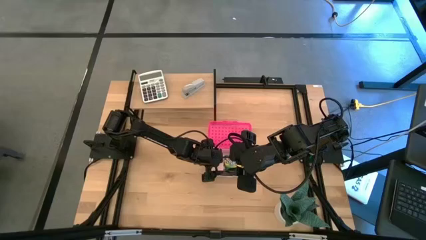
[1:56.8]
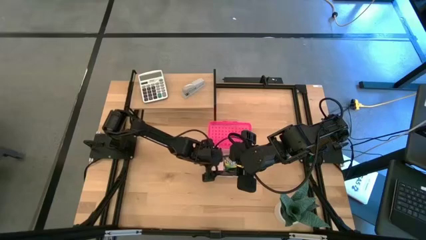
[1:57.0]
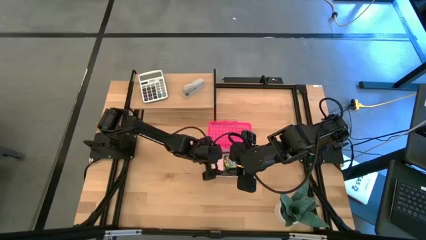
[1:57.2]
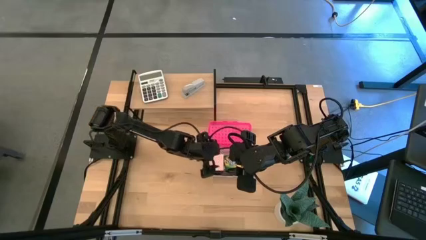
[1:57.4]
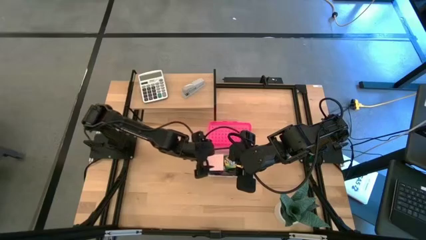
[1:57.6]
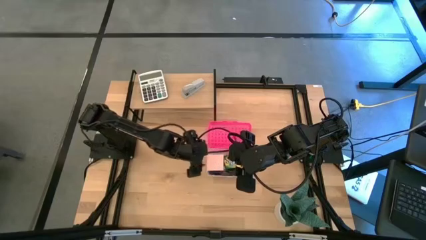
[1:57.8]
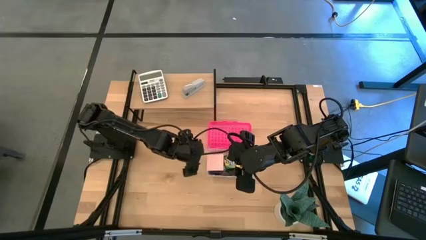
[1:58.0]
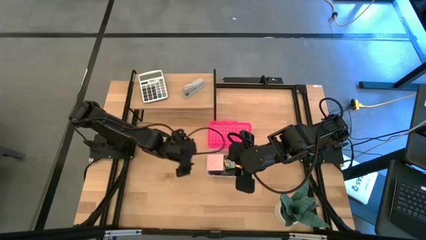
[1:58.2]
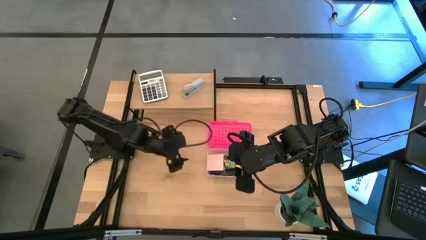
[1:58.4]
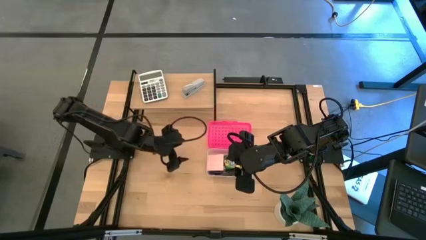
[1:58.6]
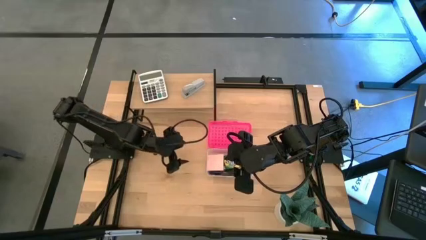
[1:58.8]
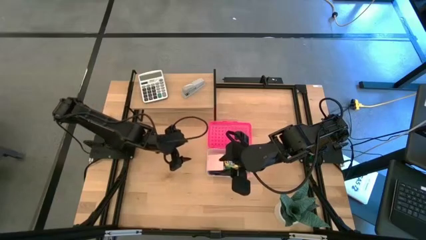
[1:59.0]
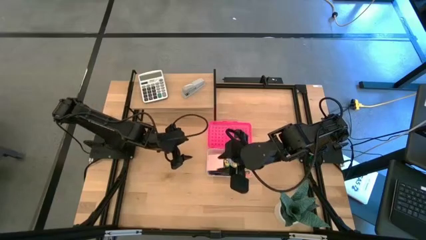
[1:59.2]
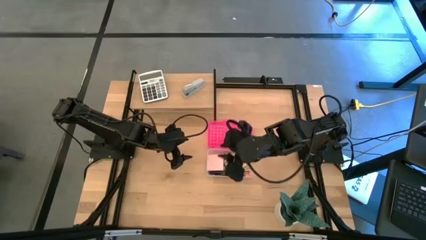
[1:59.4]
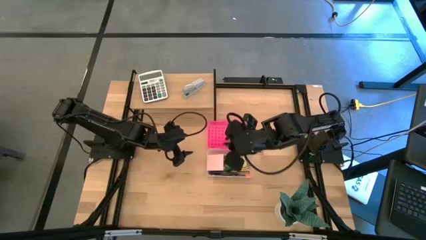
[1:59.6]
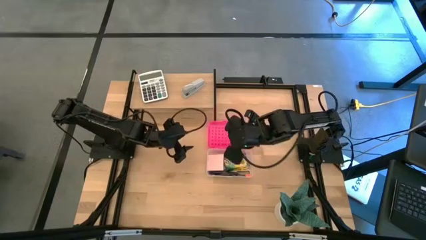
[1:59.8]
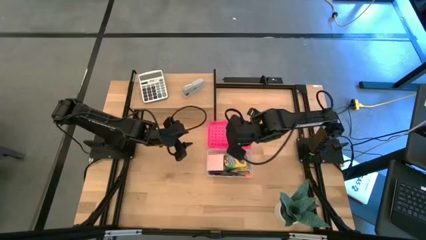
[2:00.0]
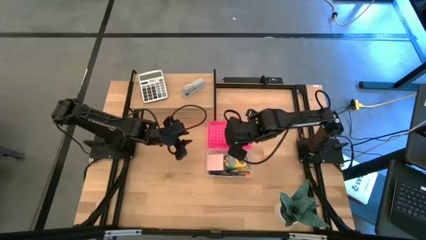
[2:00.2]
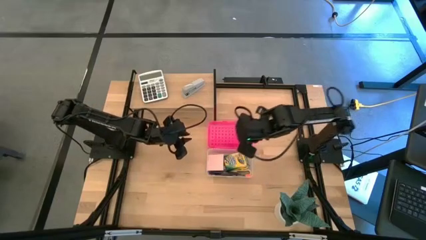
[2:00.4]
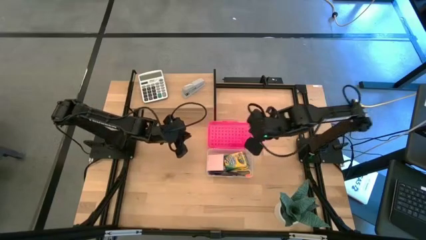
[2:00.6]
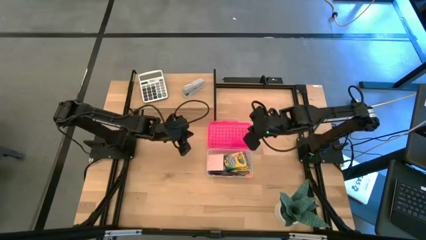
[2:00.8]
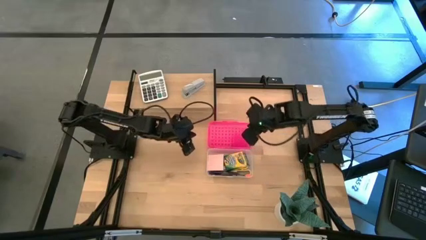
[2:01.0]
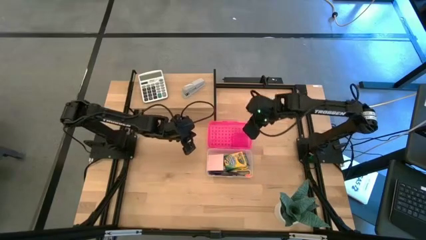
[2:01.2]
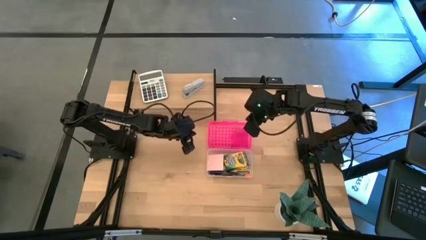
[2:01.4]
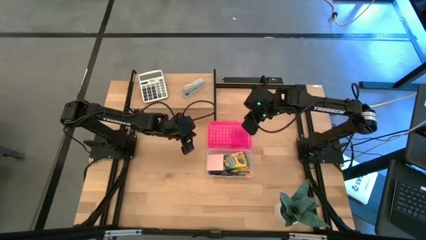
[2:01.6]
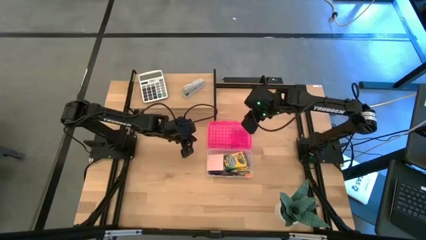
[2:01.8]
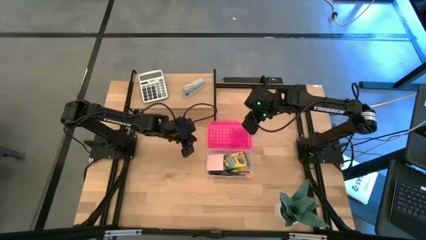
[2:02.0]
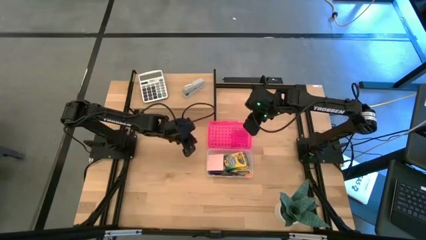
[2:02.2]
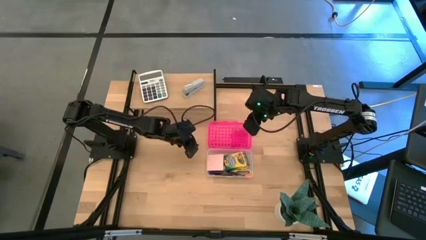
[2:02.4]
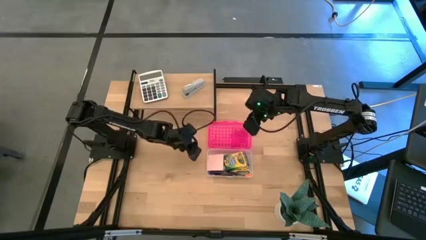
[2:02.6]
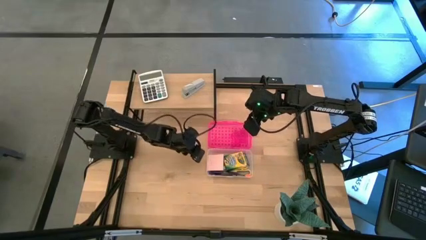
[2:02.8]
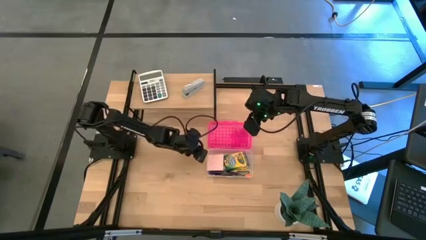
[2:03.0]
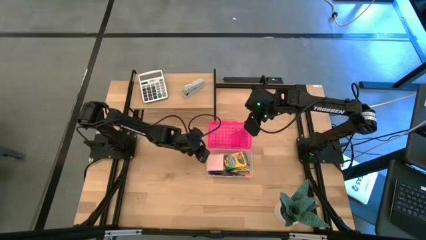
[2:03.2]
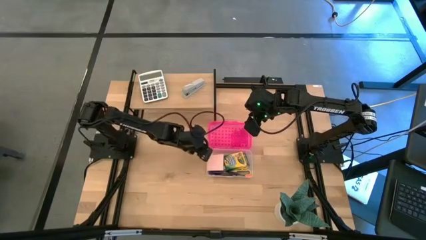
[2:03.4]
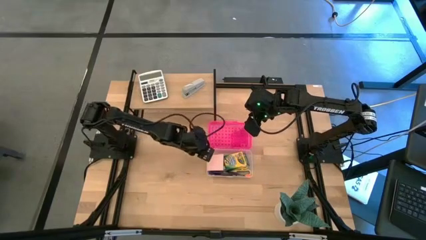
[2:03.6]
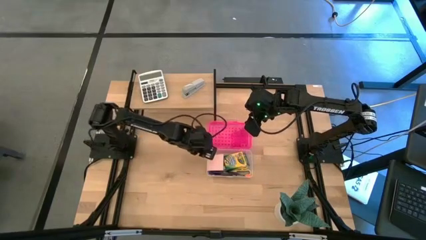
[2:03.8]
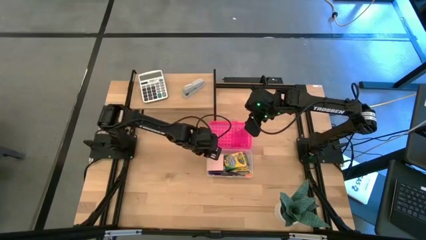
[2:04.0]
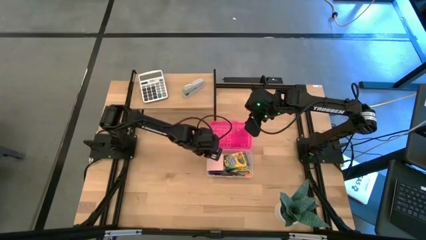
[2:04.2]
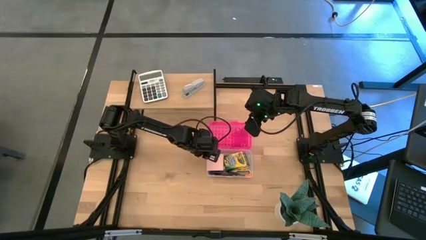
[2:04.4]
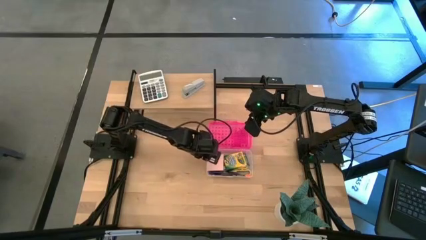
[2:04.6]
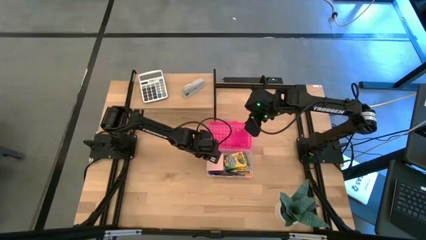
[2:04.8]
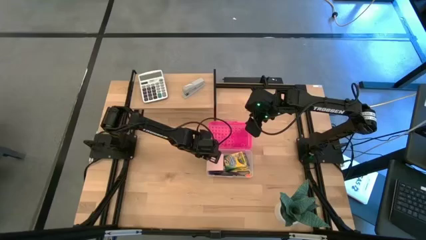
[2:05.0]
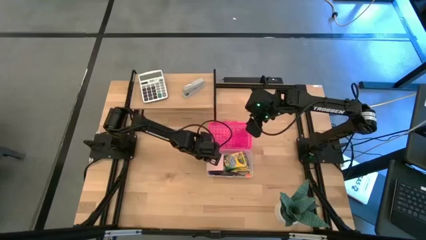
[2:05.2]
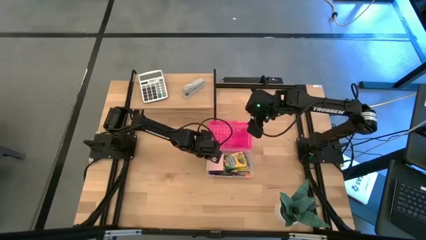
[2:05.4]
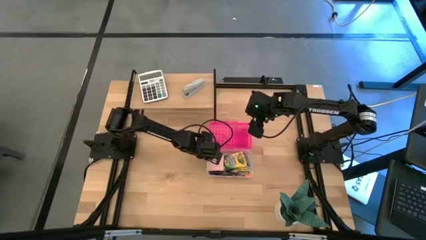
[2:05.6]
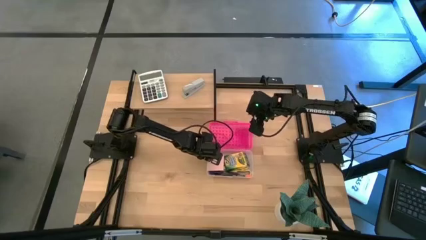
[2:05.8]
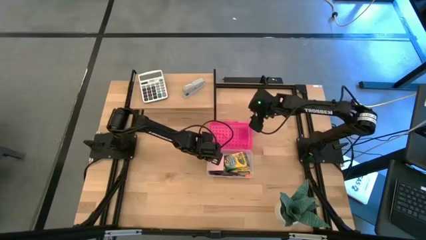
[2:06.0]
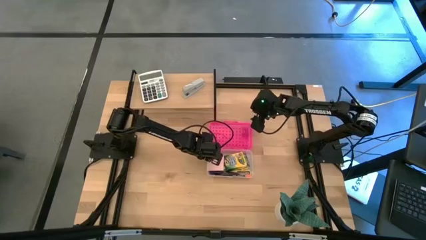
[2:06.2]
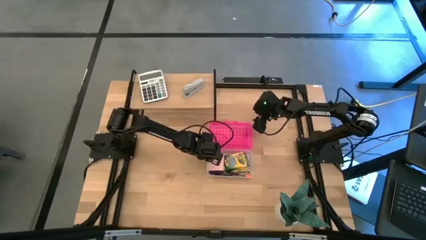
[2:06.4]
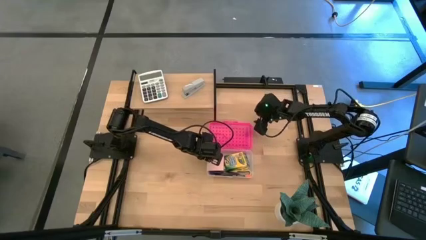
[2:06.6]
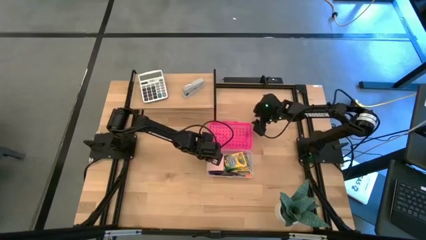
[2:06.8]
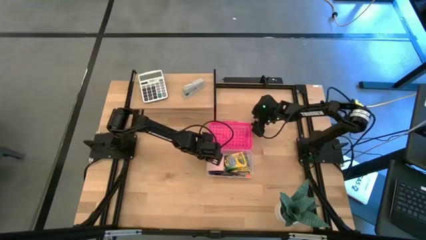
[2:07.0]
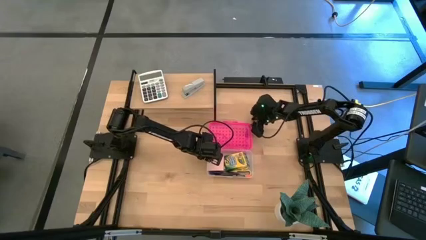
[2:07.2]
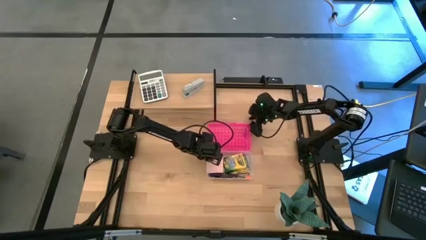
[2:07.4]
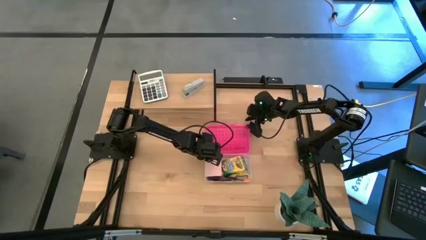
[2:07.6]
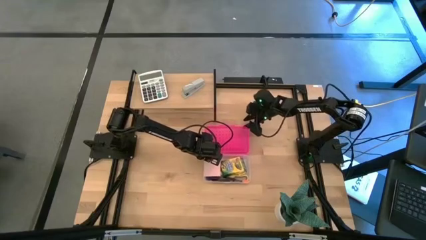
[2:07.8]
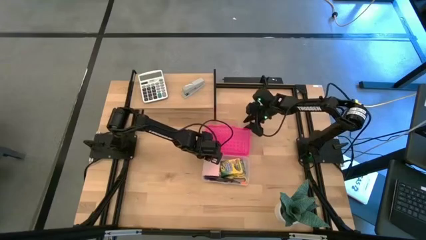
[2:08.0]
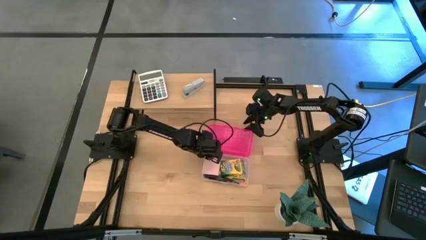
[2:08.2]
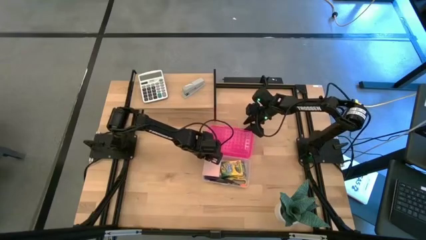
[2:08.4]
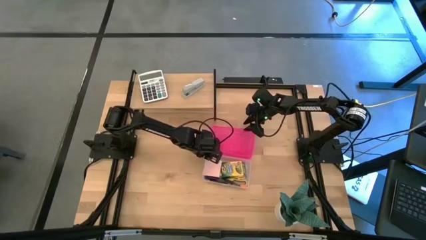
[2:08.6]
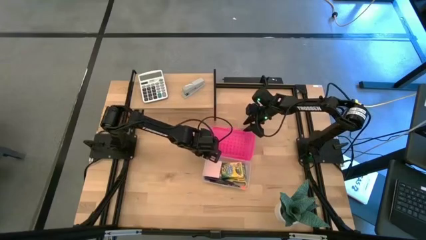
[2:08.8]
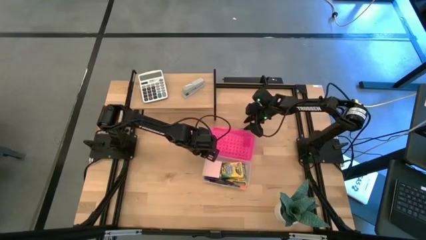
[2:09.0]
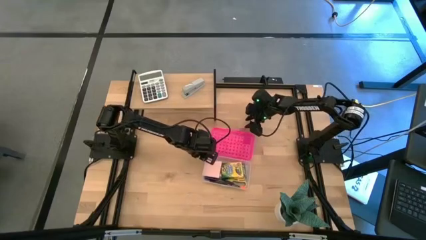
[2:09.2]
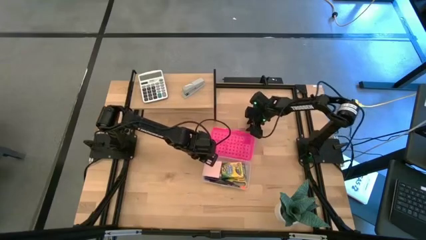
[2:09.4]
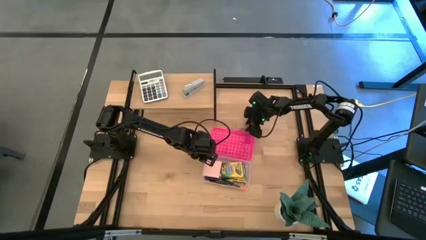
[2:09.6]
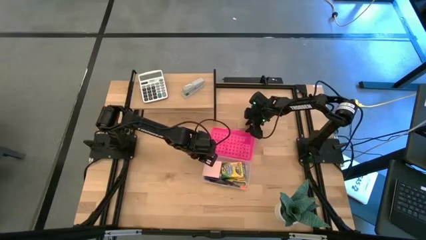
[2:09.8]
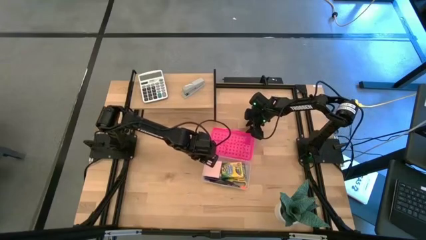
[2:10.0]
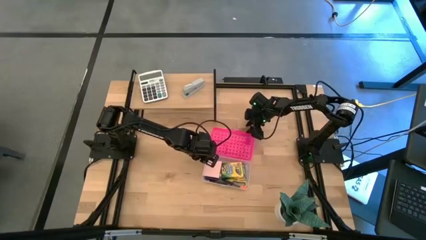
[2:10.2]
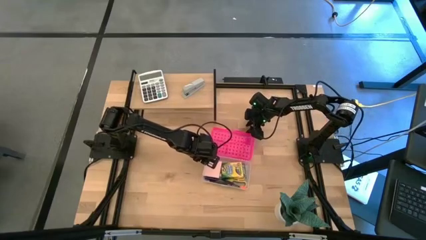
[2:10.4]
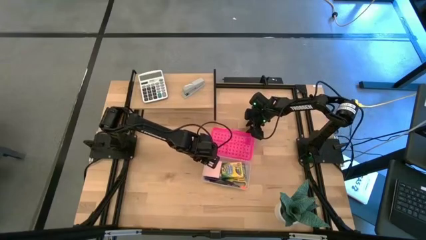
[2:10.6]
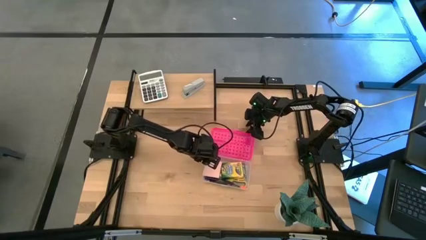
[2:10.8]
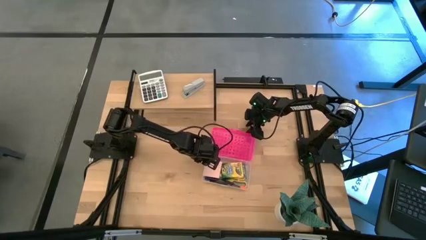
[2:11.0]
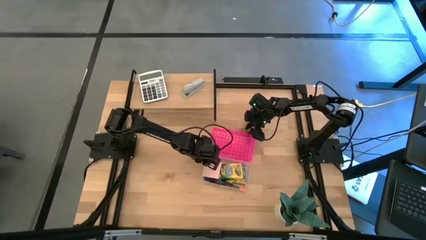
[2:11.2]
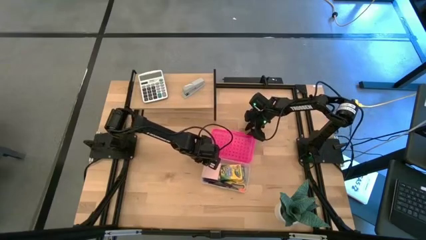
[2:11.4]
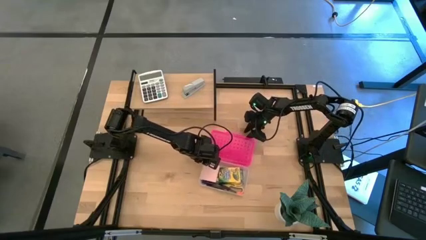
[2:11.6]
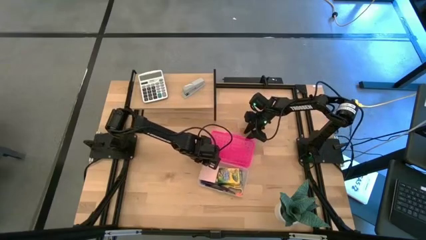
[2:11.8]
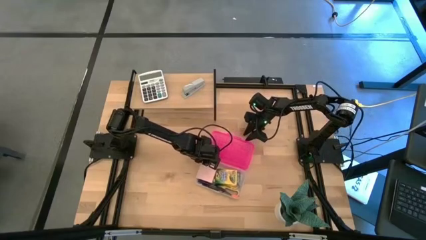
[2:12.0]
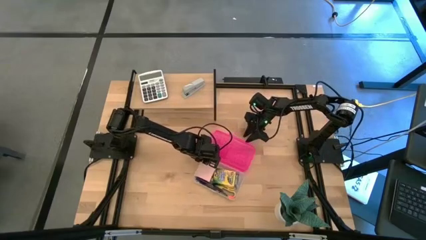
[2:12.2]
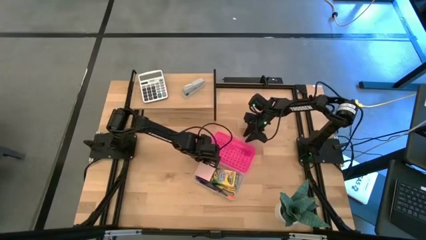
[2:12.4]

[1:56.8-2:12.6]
Task: Pack school essentials
Close the pink supply box

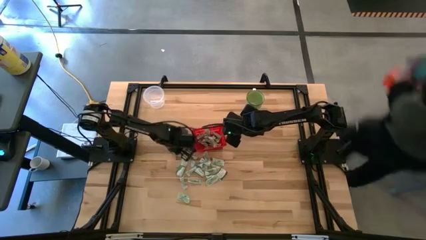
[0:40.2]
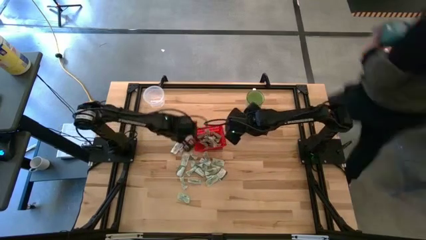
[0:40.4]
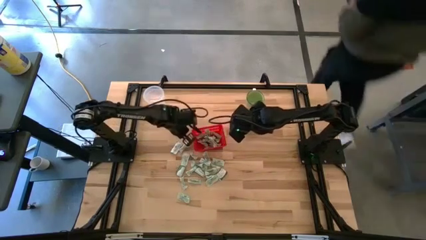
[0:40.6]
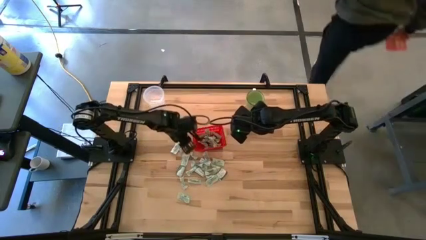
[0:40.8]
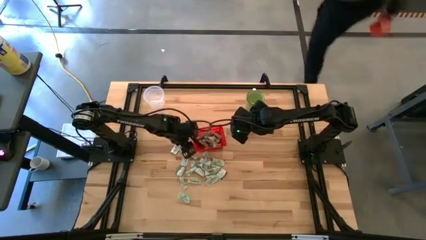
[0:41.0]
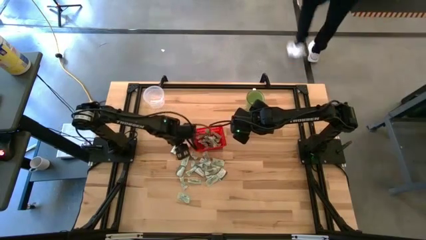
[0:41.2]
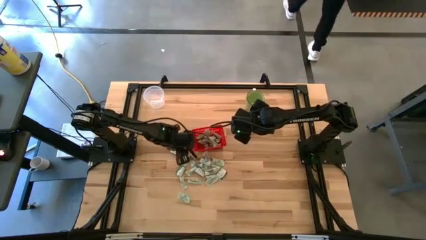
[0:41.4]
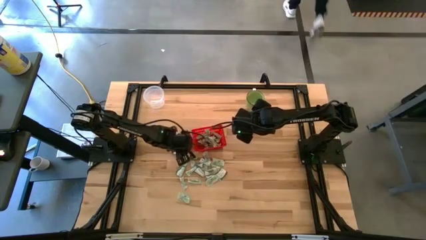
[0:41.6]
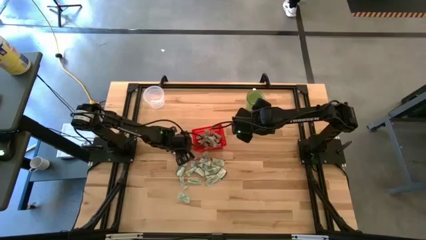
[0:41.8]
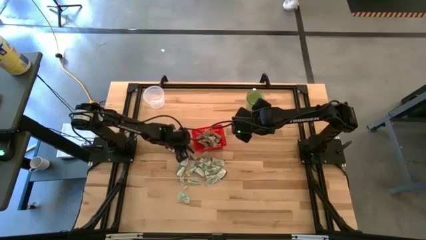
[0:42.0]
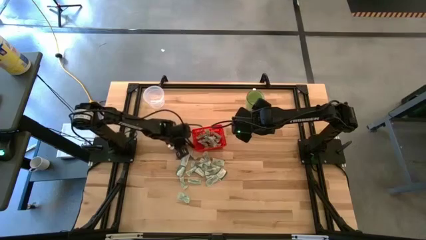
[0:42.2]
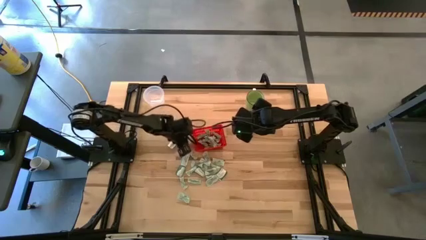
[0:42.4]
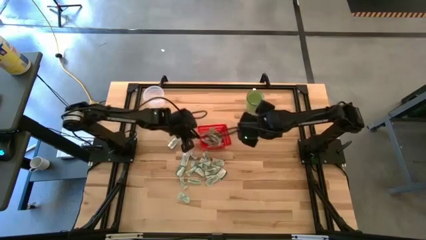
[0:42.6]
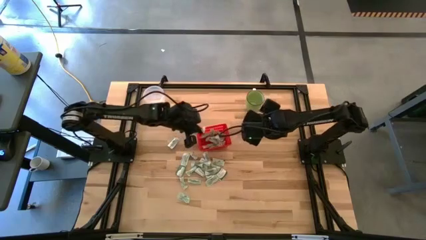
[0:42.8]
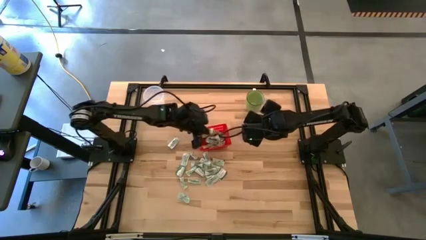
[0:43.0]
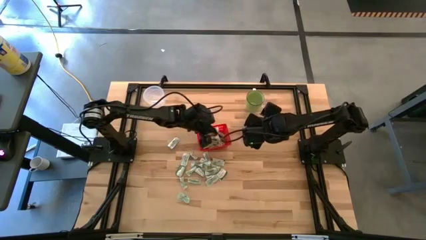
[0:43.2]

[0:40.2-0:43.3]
Task: Pick and place Stevia / Truvia into bins
Put the stevia packet into the red basket
